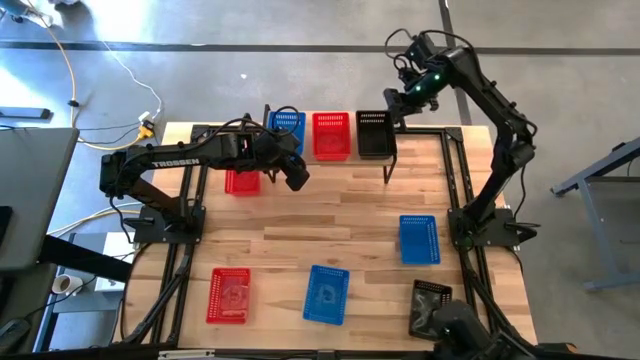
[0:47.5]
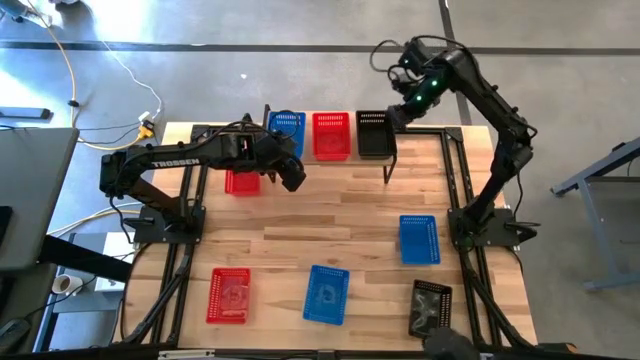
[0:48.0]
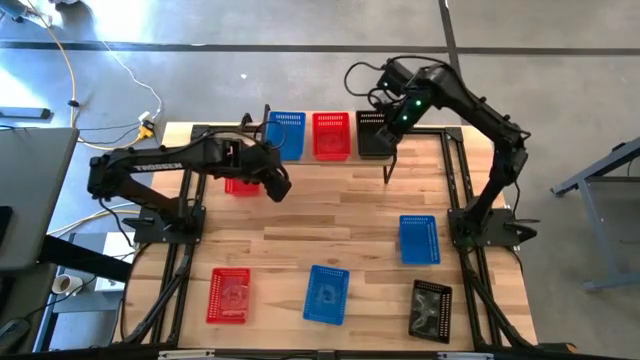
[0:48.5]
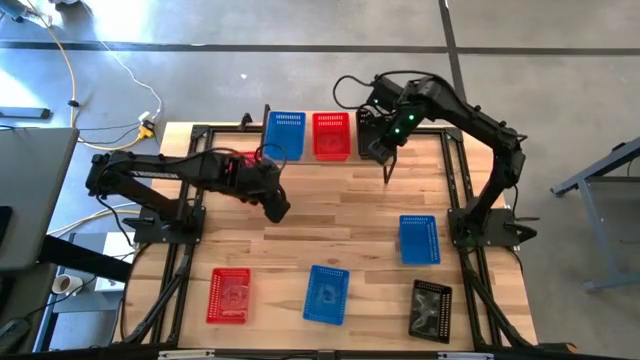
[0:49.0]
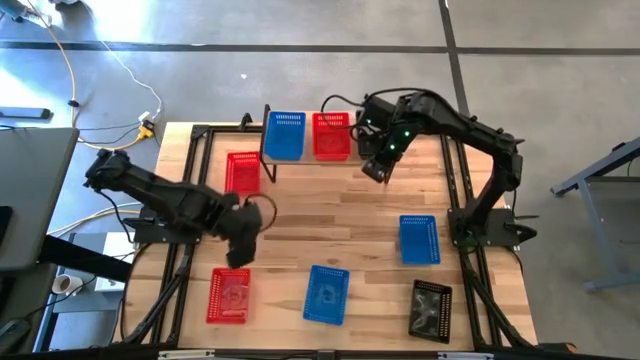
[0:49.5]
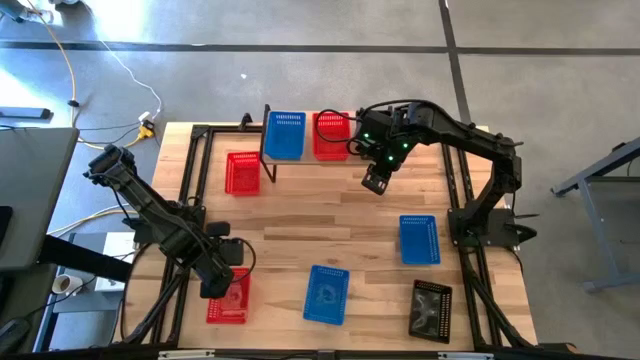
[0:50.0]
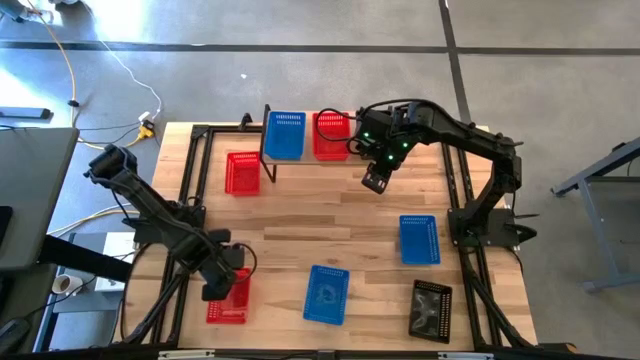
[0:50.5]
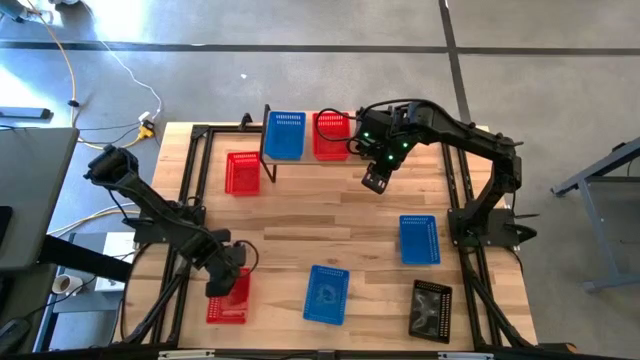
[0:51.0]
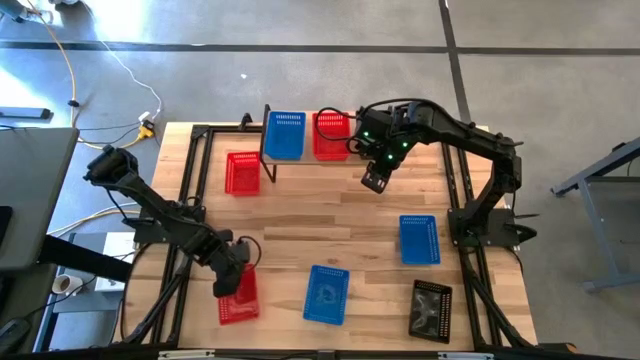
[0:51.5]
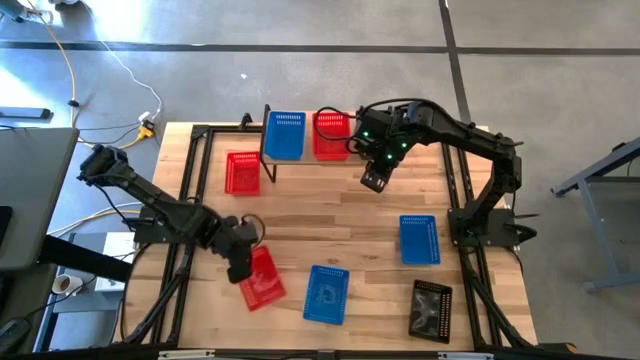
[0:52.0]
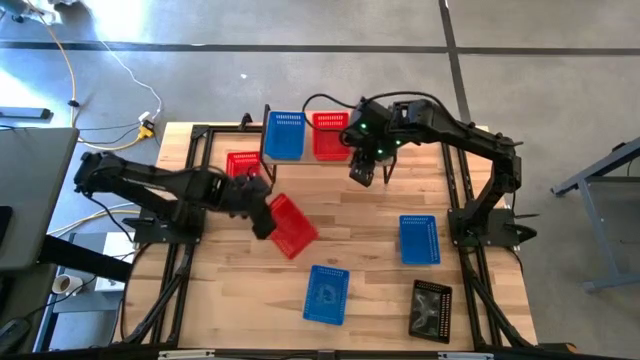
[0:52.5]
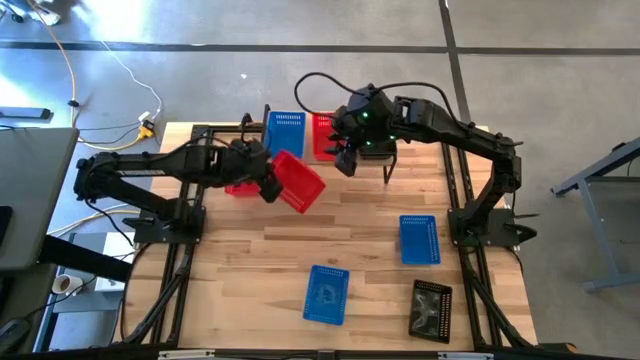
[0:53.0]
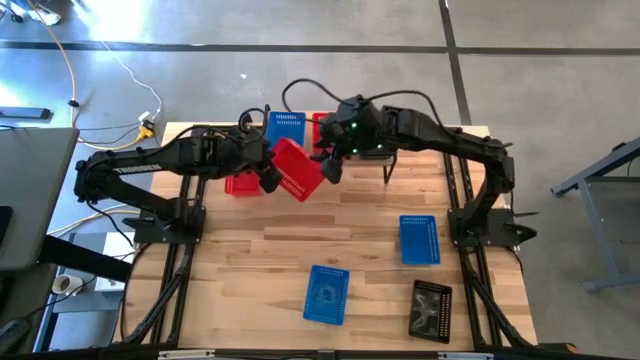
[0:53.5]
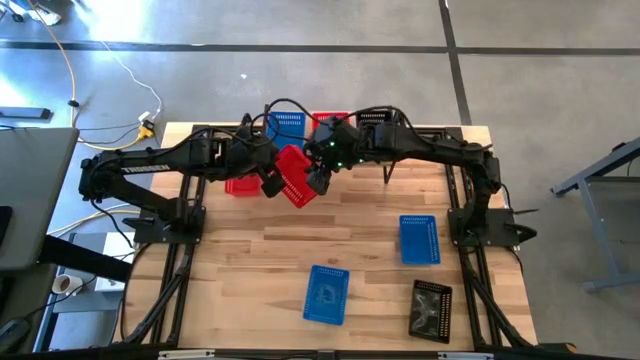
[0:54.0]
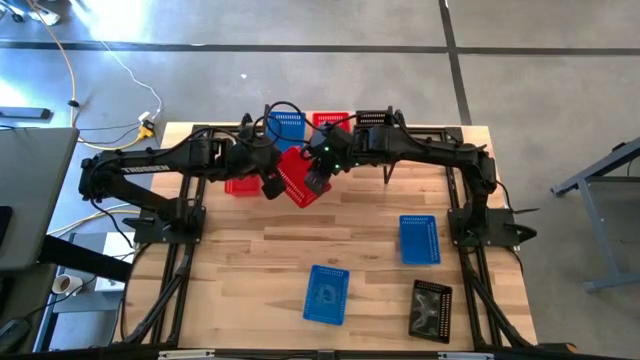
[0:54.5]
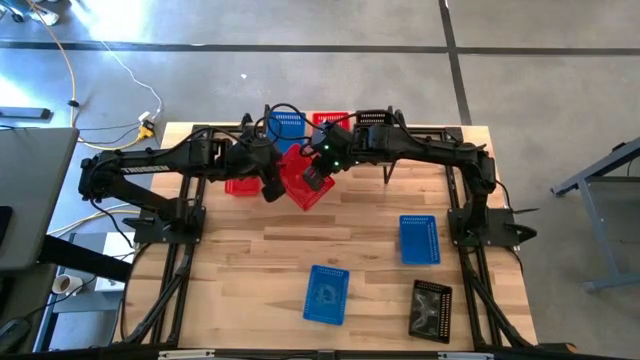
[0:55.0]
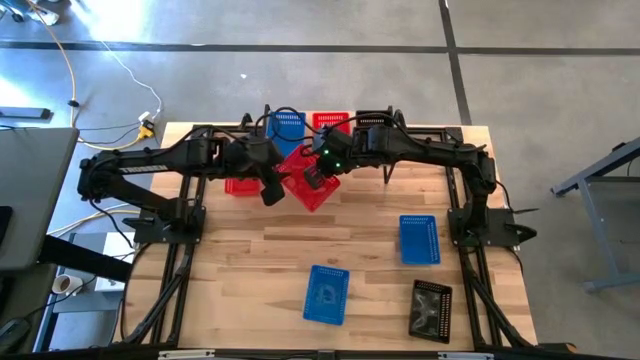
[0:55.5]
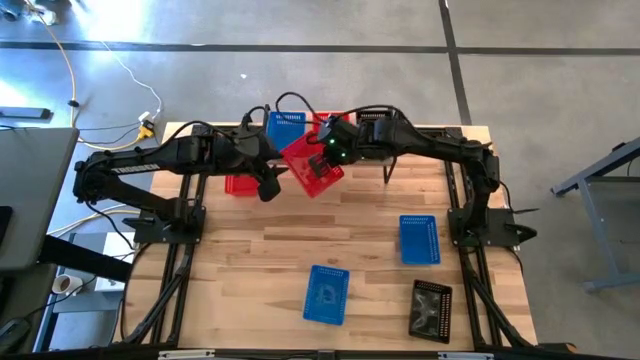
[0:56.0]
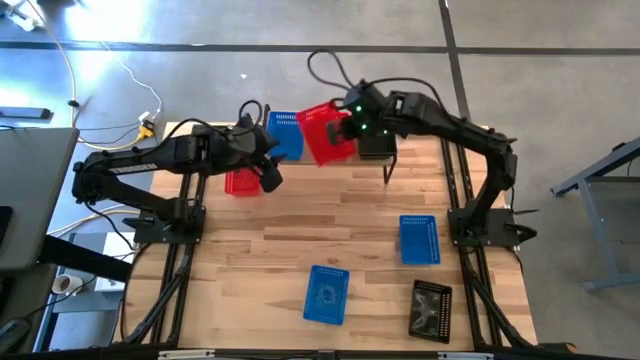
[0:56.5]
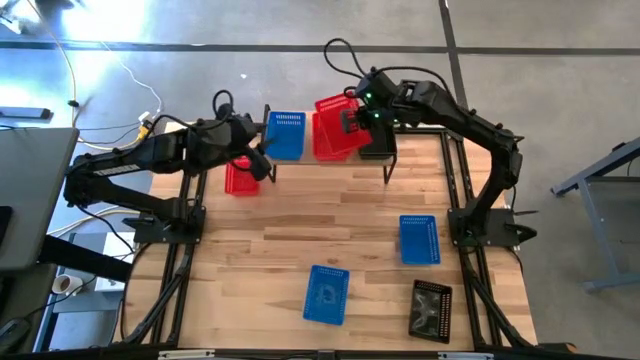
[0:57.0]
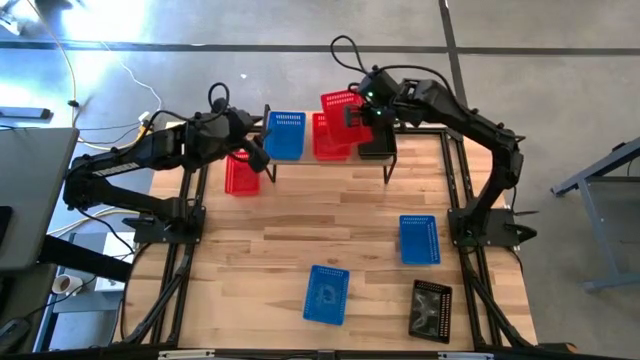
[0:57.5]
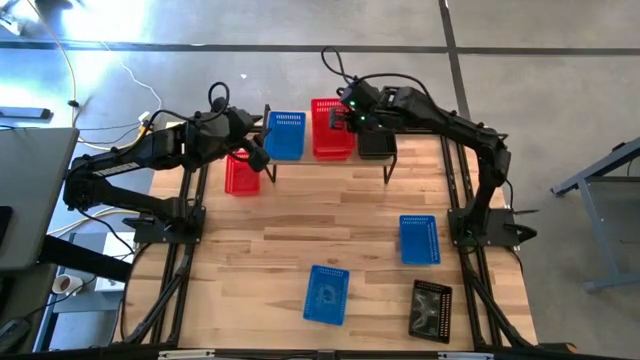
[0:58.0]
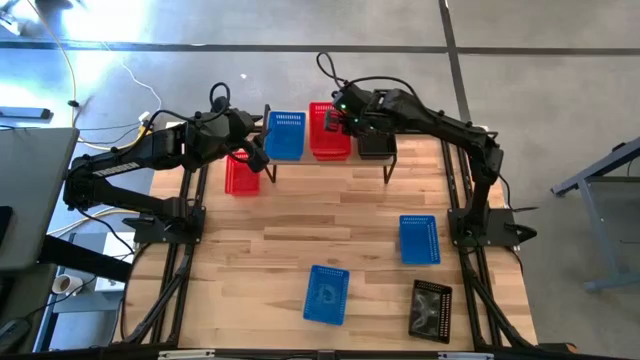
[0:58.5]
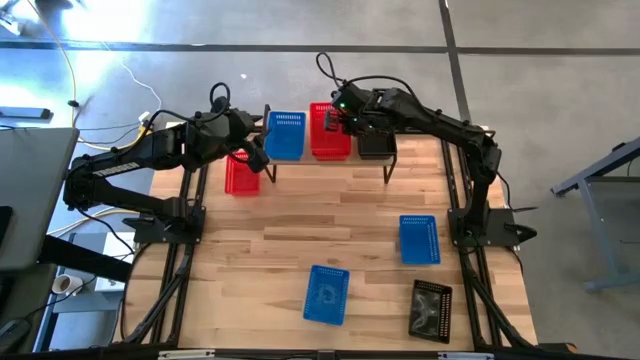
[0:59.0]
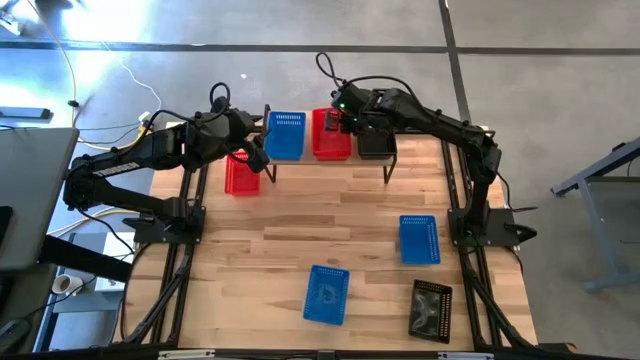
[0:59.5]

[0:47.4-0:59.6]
Task: Stack baskets on shelf by color
Stack the bottom red basket into the red basket on the shelf

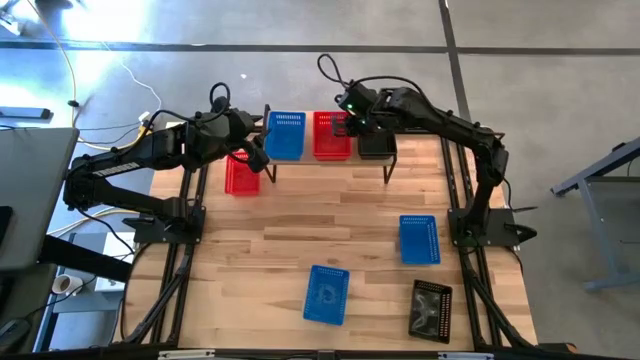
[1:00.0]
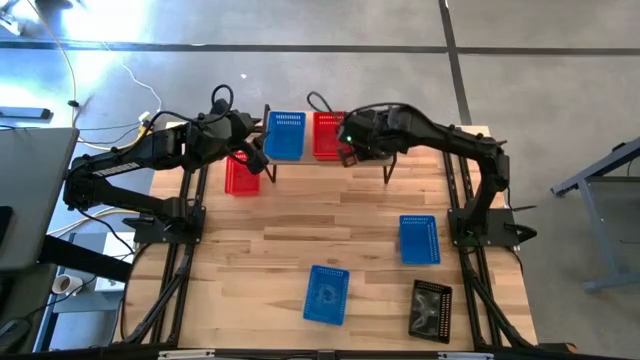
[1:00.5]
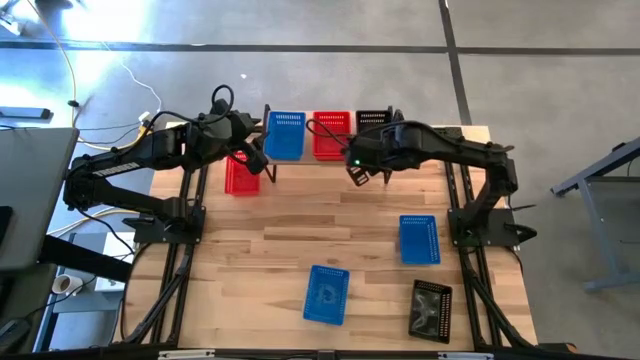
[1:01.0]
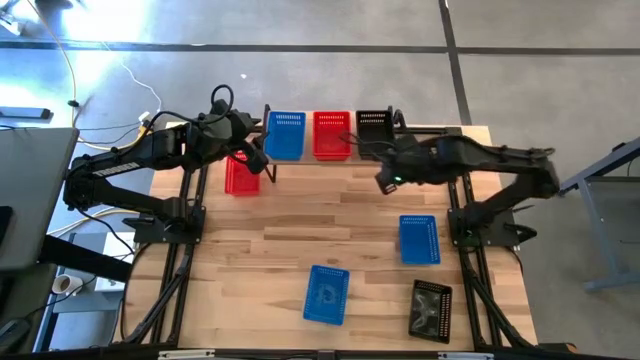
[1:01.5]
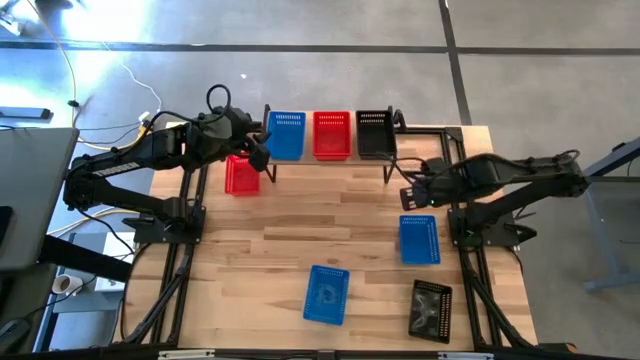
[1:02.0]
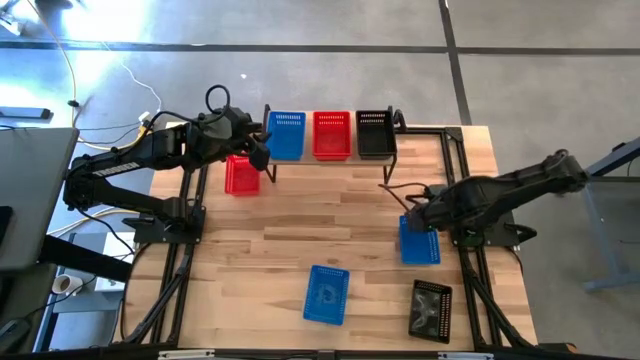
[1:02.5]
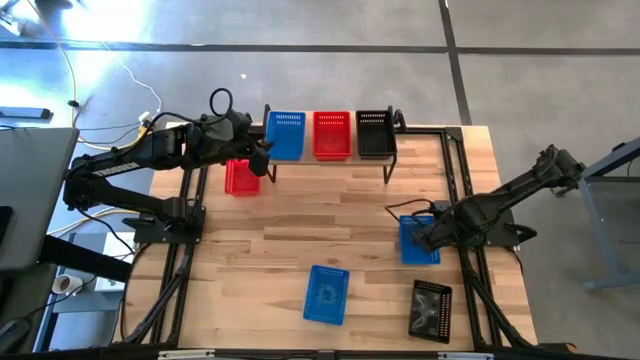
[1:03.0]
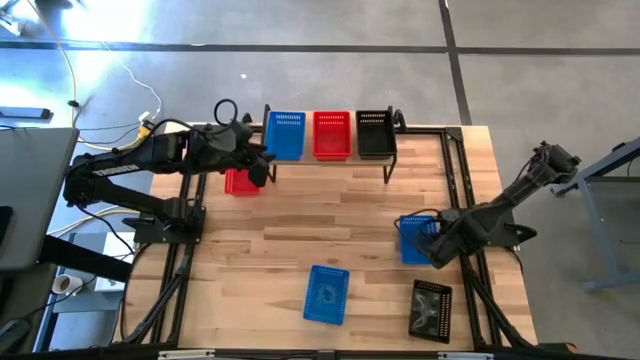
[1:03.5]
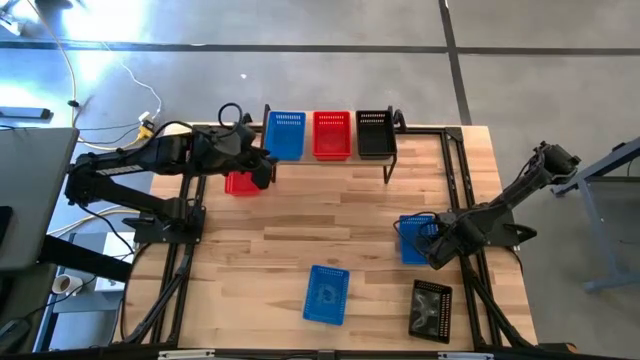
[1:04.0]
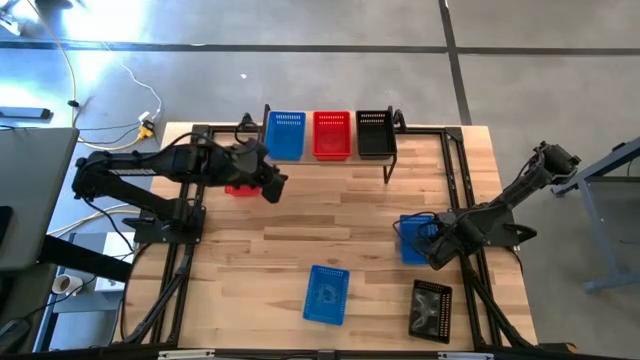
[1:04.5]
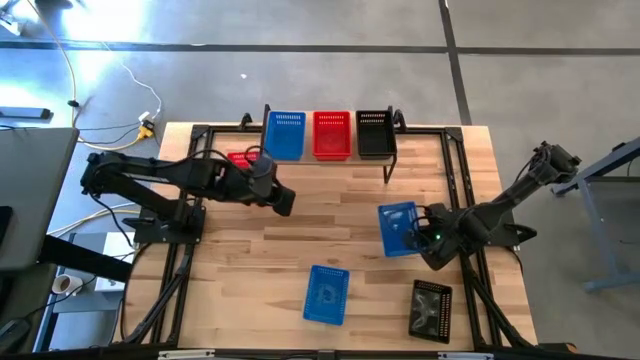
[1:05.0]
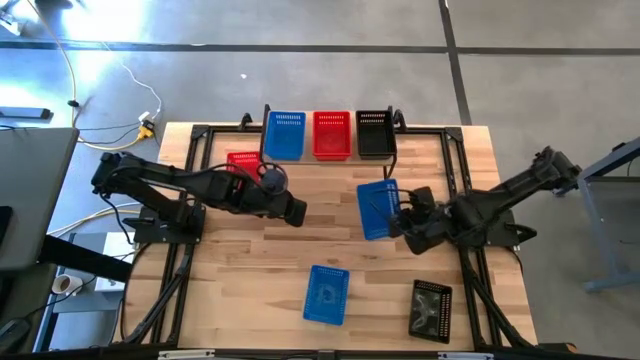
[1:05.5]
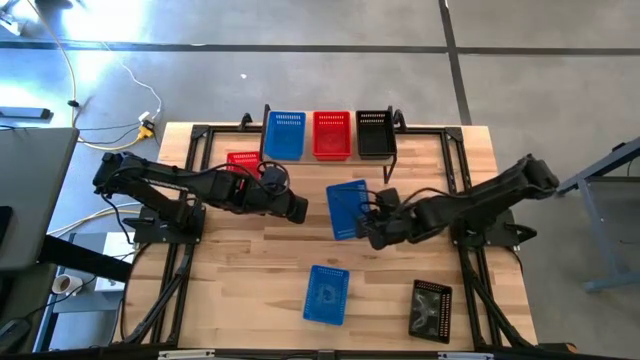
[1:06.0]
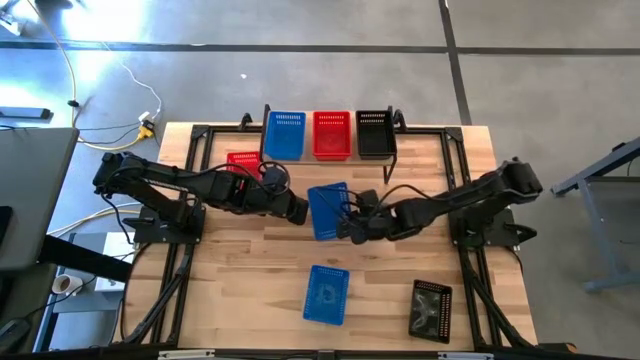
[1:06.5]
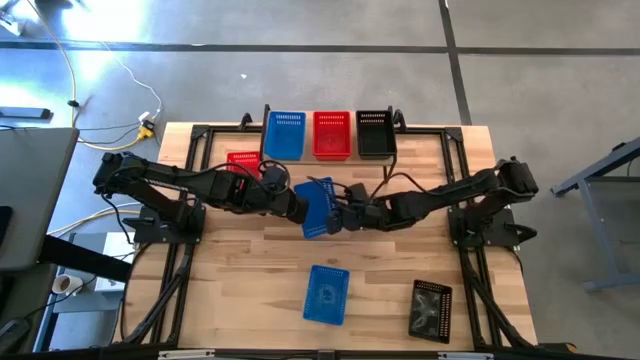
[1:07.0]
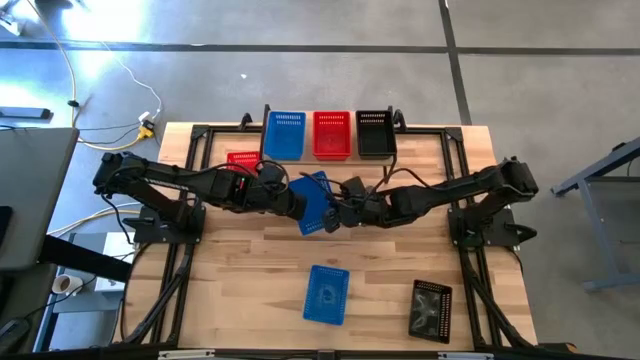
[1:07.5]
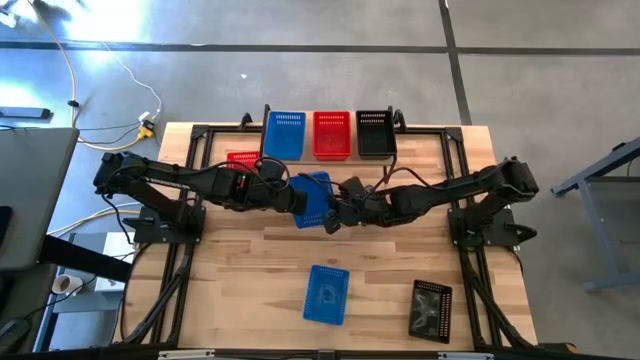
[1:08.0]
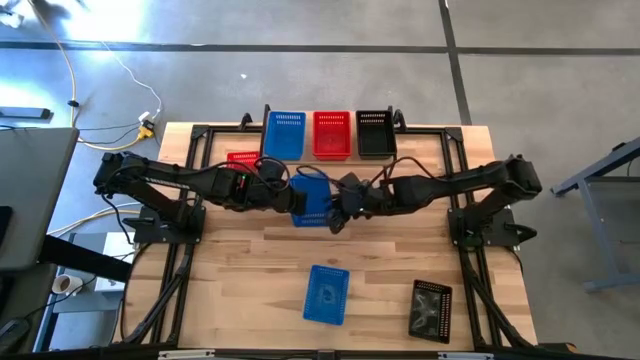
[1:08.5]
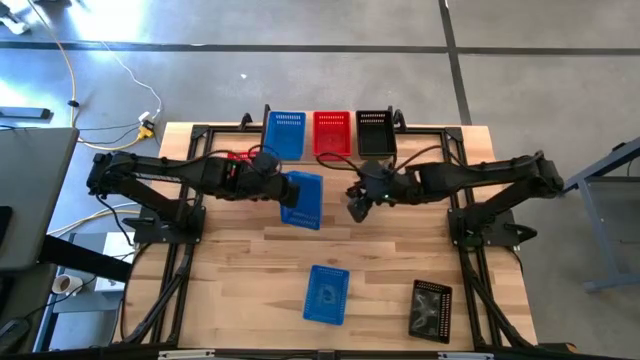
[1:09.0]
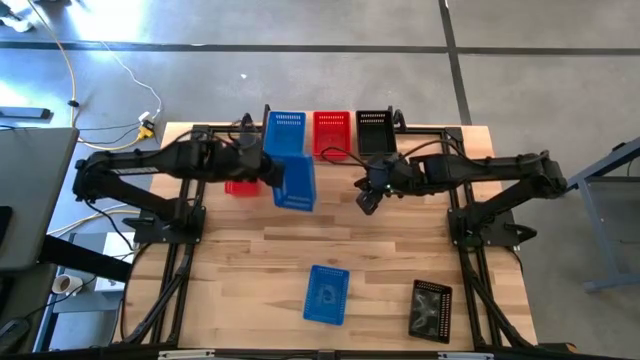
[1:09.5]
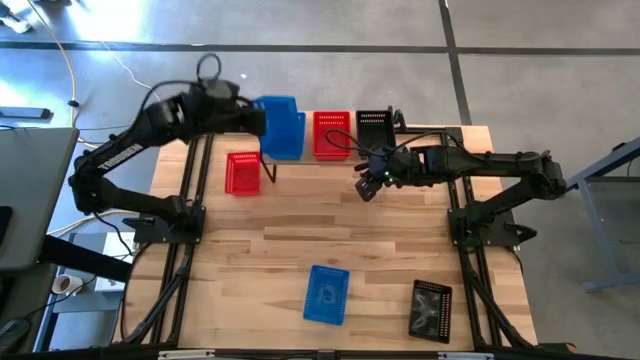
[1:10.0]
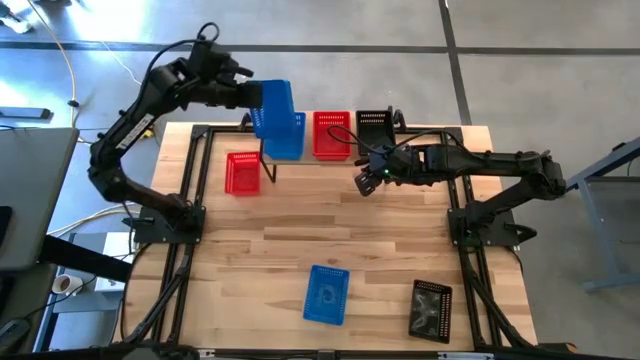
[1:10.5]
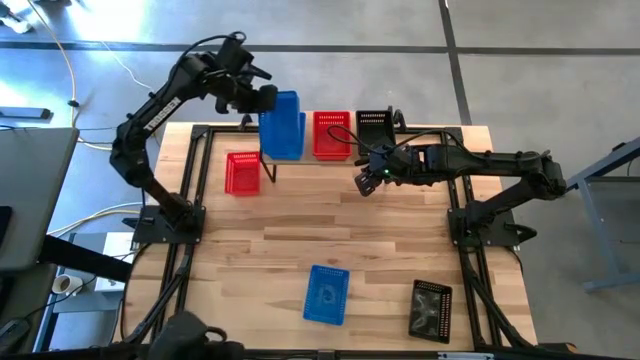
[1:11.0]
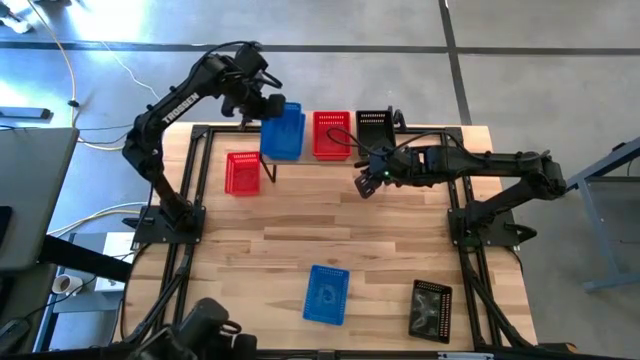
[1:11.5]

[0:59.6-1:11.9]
Stack the top blue basket into the blue basket on the shelf
